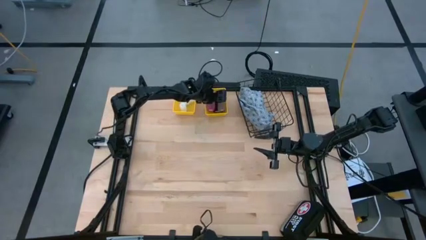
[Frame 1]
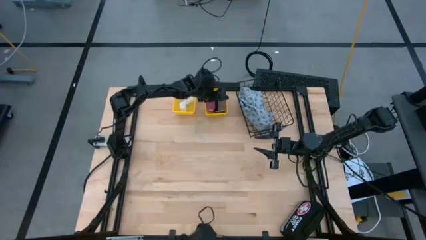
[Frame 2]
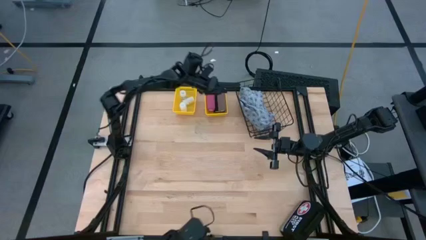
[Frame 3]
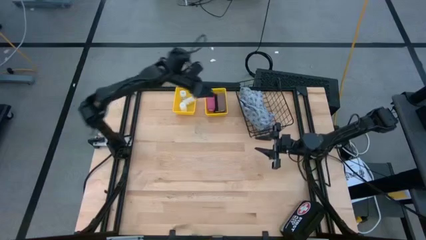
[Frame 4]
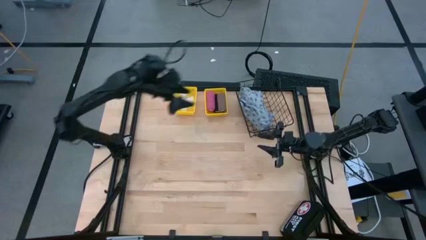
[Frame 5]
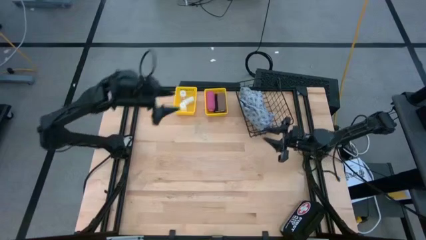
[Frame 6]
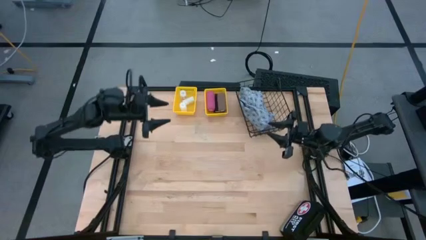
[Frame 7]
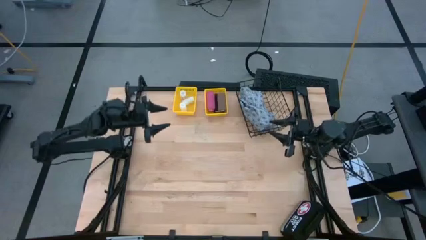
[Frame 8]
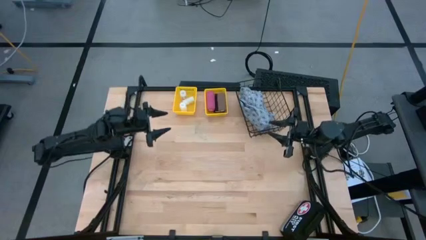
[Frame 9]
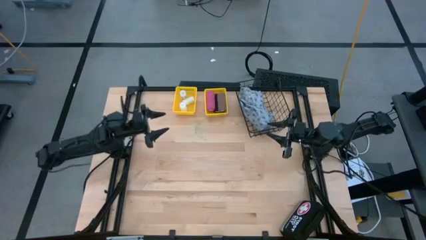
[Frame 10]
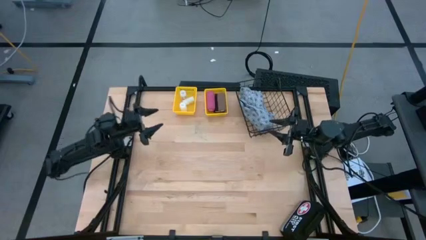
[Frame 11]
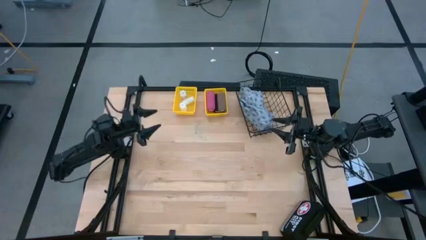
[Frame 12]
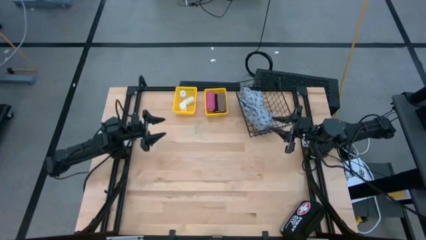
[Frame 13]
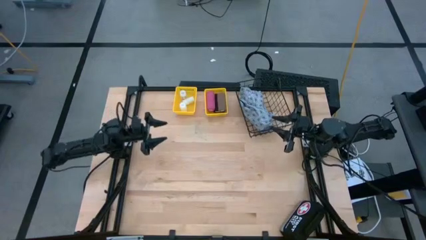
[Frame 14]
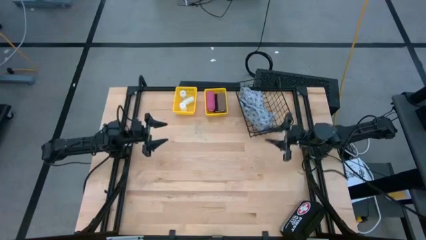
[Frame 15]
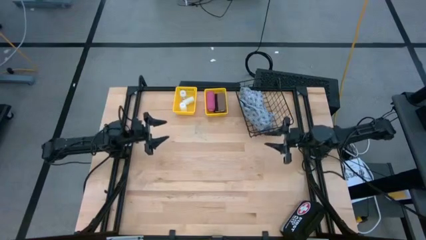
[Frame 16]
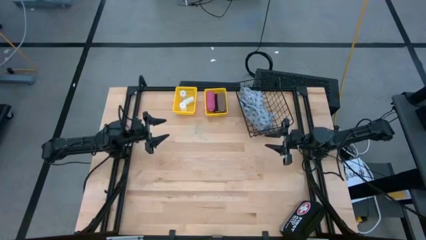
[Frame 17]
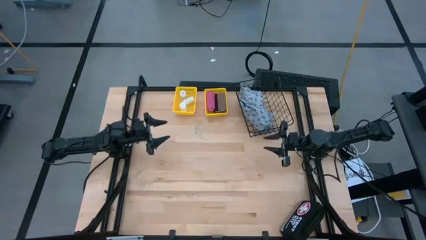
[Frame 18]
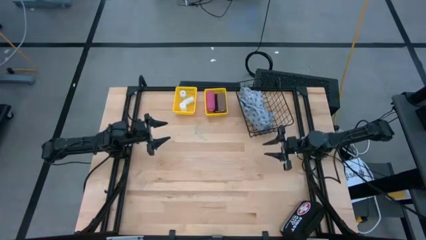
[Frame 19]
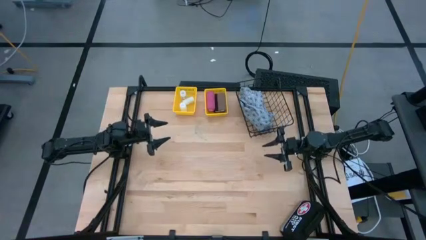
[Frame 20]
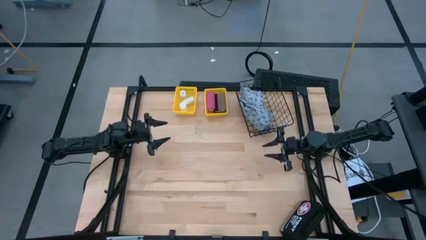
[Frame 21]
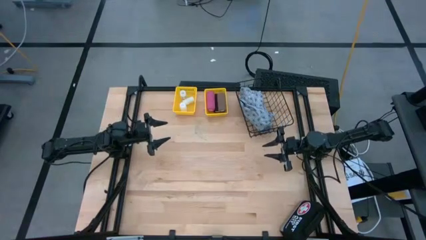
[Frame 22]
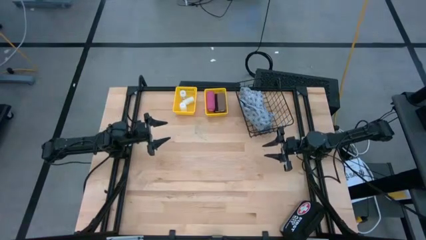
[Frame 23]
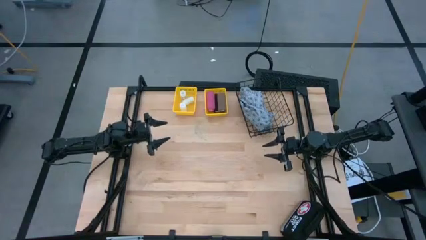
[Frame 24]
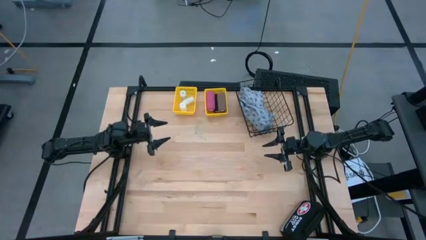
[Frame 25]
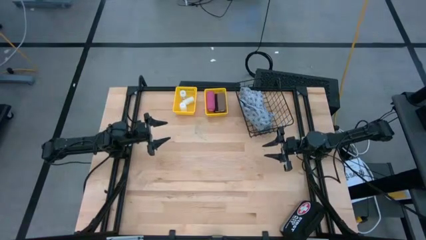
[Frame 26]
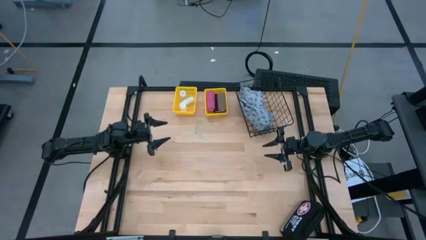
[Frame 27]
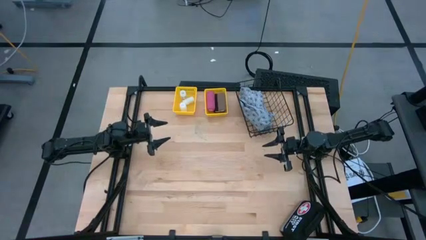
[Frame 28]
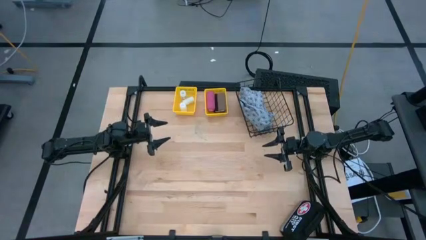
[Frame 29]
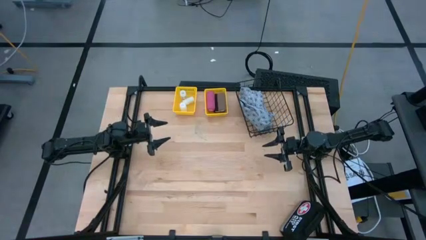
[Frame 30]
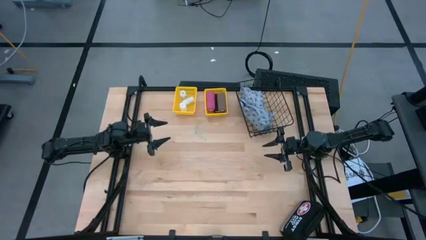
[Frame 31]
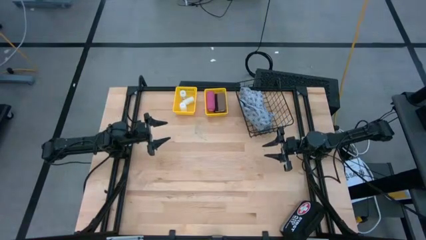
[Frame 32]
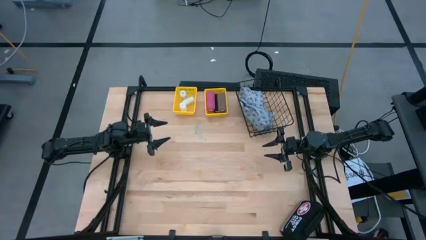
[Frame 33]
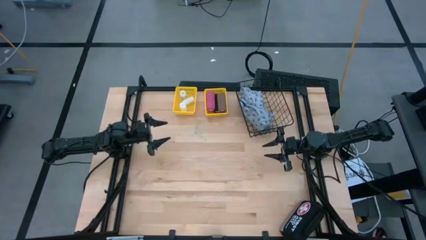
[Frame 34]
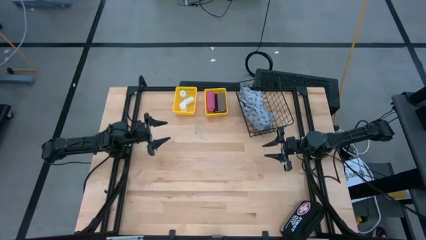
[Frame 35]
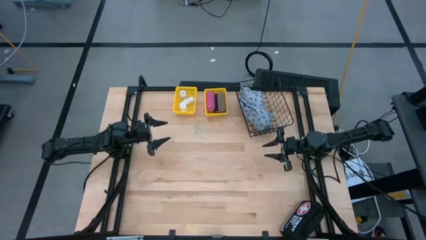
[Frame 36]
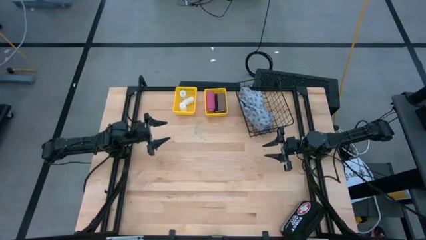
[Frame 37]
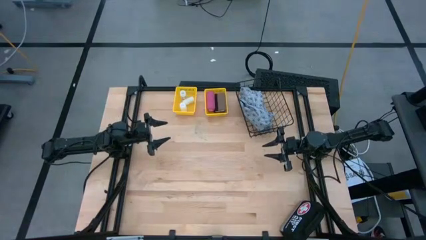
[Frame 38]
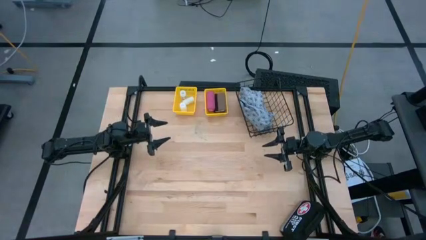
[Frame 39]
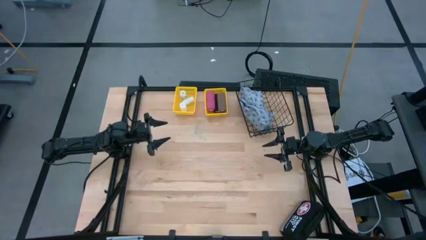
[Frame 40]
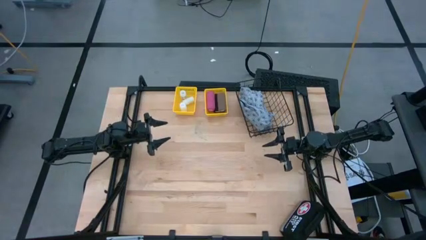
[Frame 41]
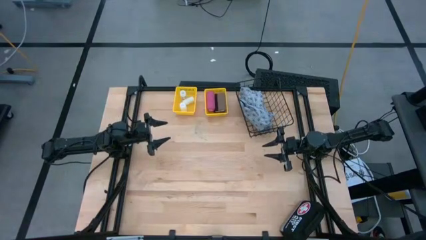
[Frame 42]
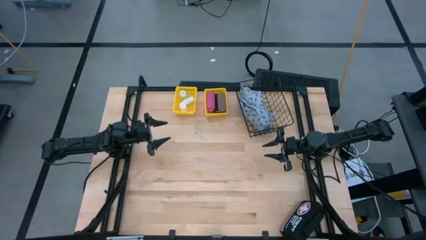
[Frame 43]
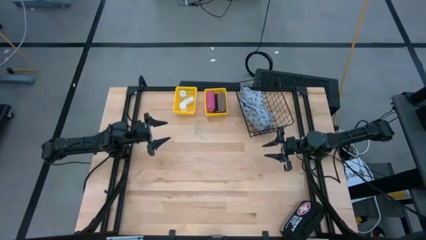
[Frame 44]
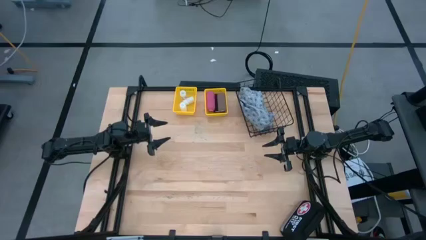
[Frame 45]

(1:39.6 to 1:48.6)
Task: Pick & Place Medicine items
Return to Home Position
